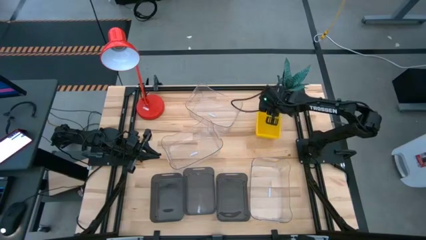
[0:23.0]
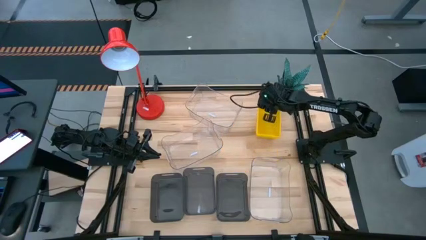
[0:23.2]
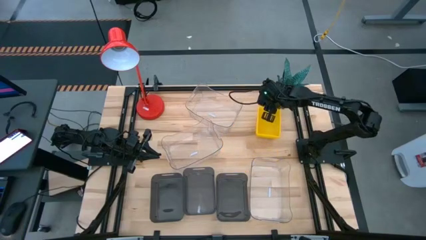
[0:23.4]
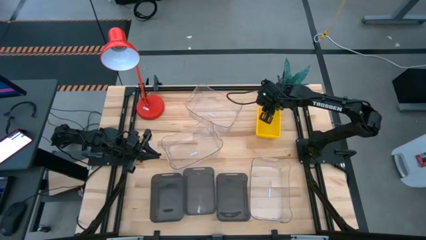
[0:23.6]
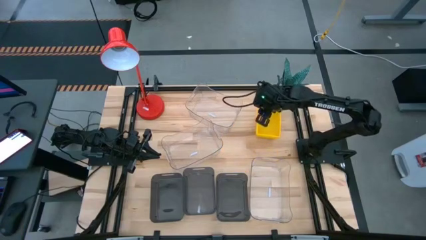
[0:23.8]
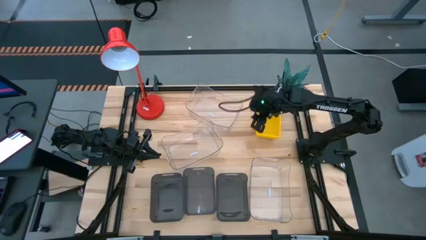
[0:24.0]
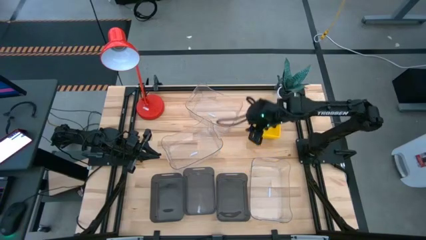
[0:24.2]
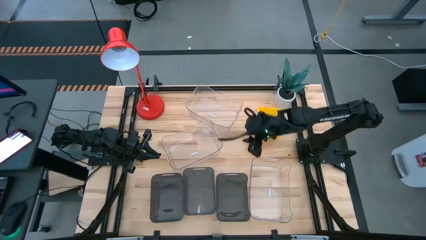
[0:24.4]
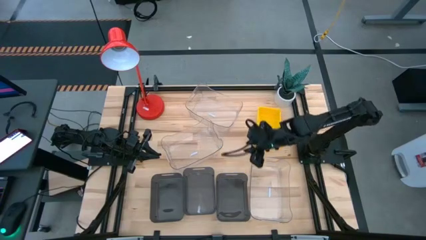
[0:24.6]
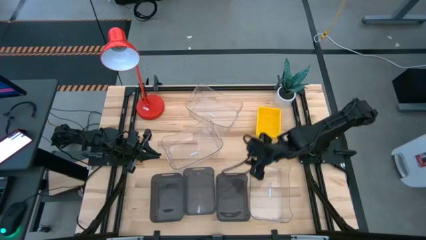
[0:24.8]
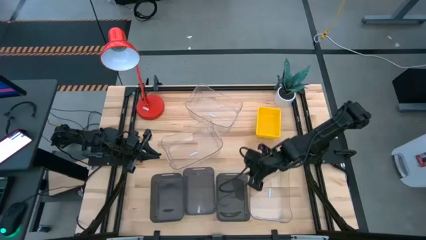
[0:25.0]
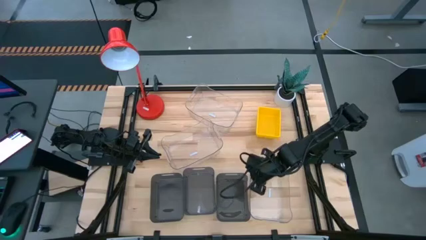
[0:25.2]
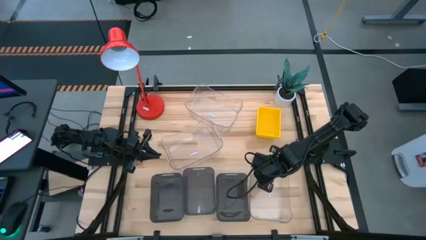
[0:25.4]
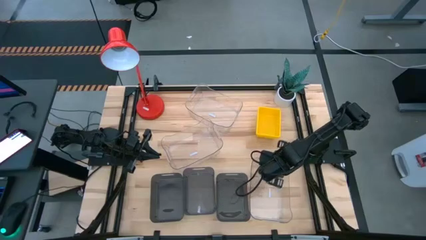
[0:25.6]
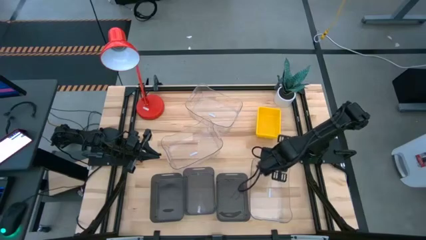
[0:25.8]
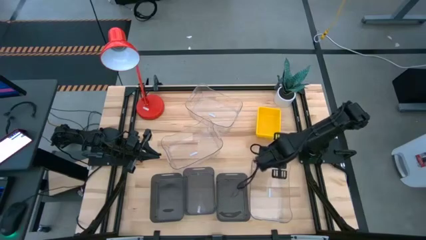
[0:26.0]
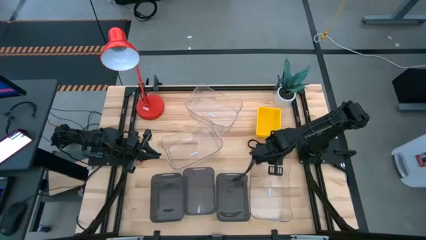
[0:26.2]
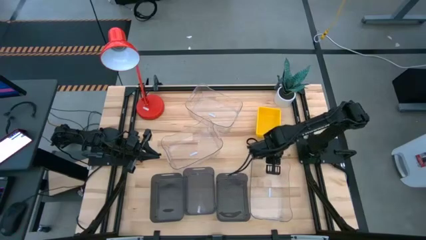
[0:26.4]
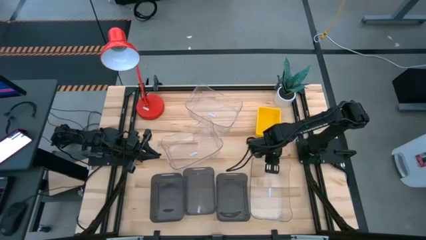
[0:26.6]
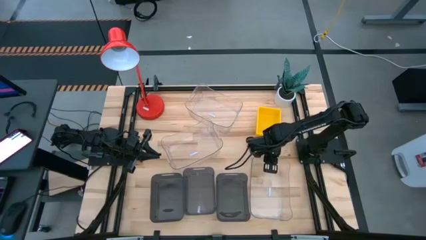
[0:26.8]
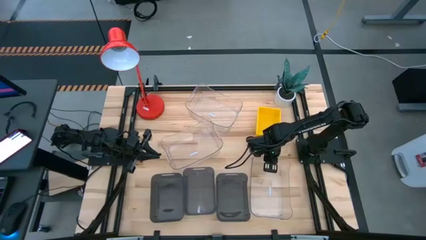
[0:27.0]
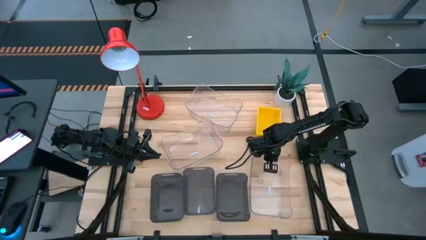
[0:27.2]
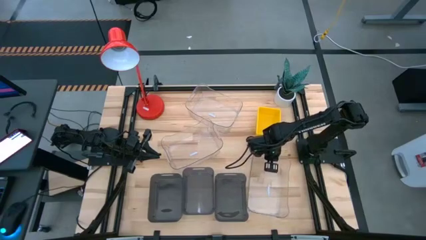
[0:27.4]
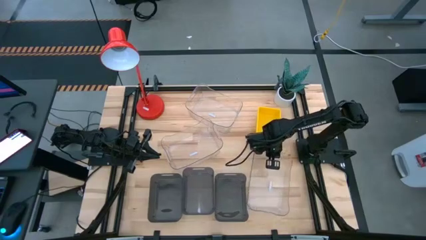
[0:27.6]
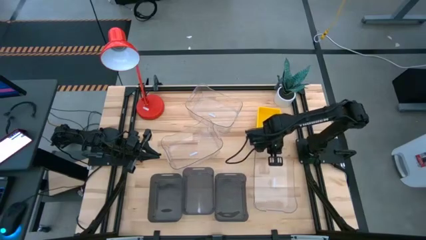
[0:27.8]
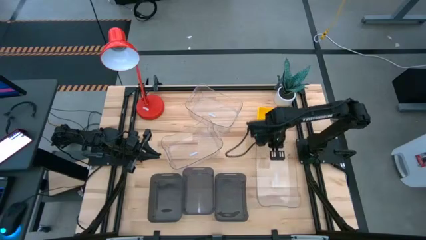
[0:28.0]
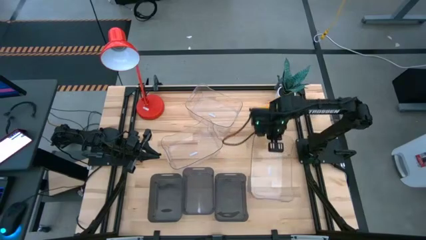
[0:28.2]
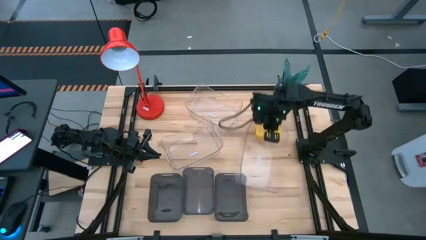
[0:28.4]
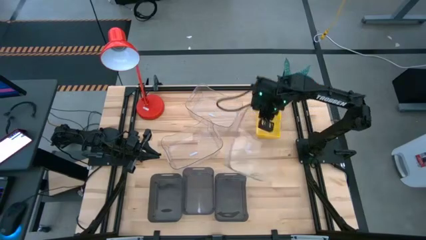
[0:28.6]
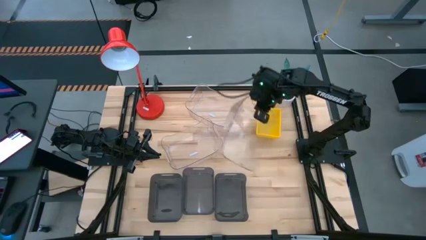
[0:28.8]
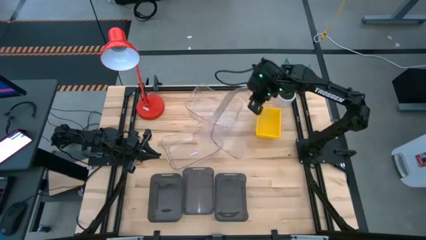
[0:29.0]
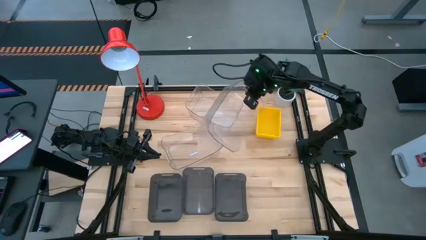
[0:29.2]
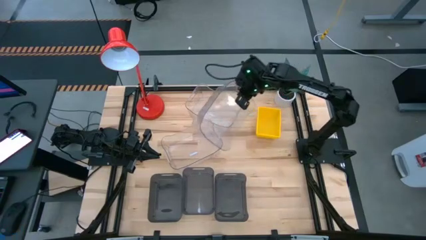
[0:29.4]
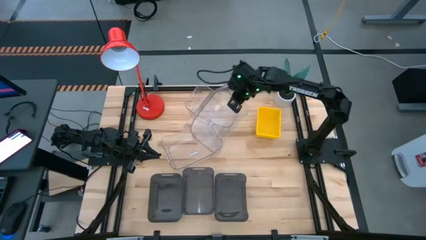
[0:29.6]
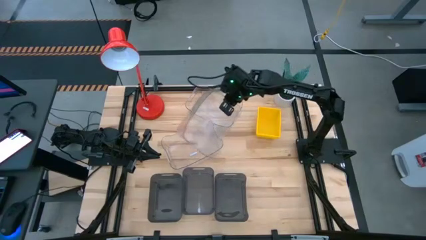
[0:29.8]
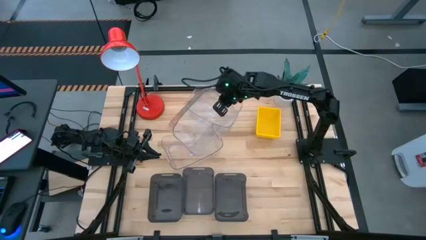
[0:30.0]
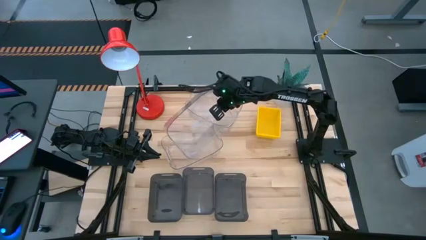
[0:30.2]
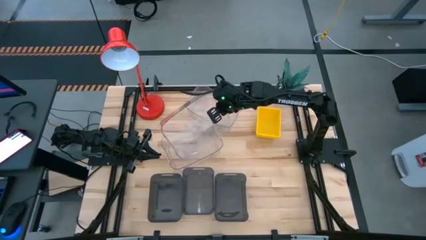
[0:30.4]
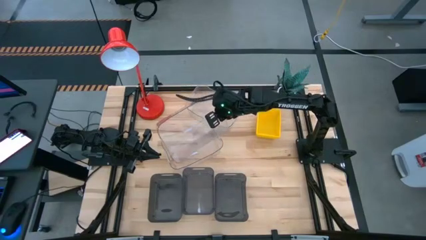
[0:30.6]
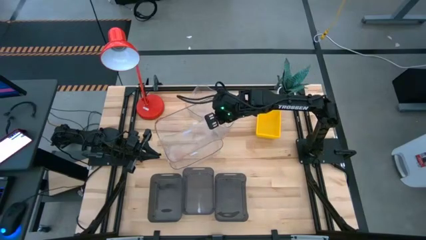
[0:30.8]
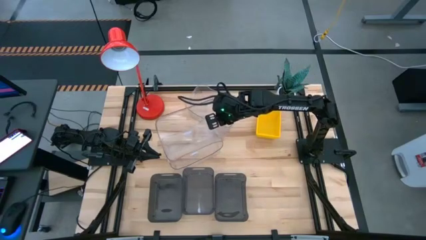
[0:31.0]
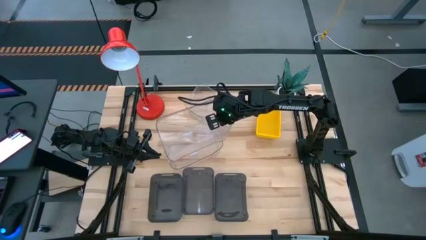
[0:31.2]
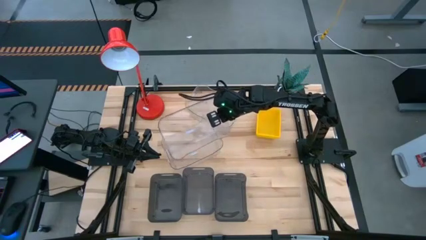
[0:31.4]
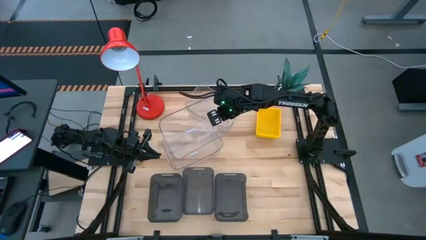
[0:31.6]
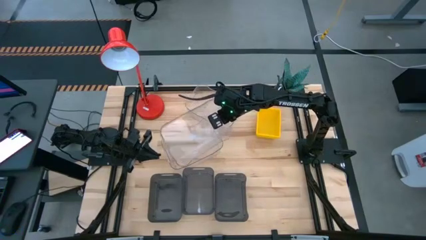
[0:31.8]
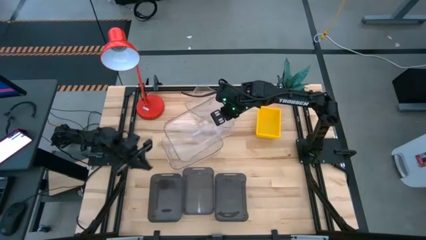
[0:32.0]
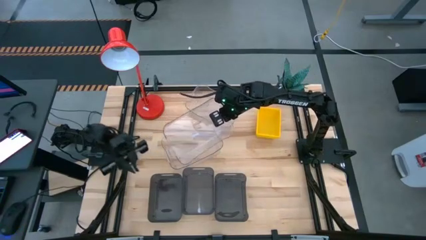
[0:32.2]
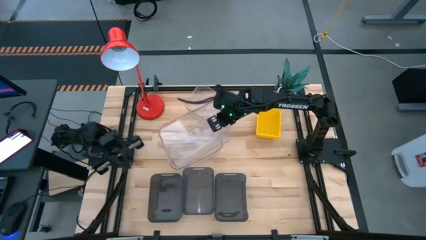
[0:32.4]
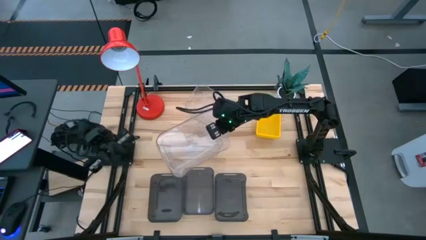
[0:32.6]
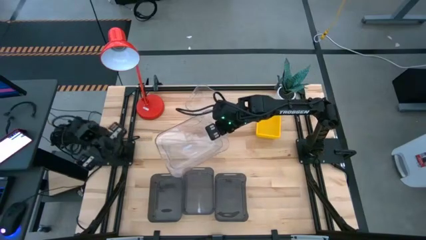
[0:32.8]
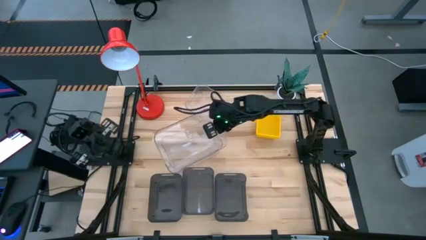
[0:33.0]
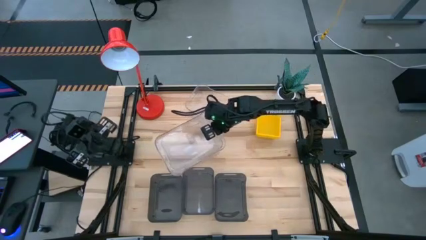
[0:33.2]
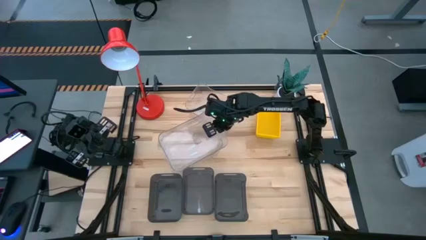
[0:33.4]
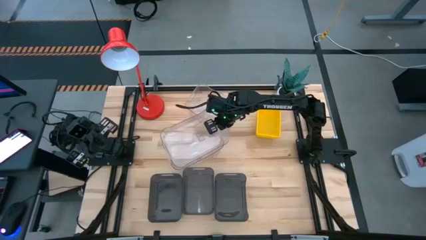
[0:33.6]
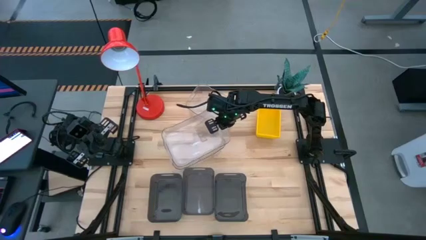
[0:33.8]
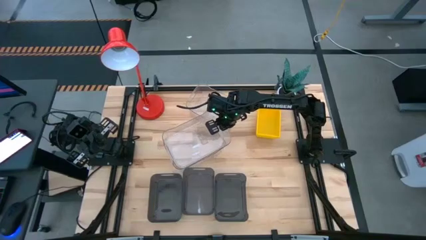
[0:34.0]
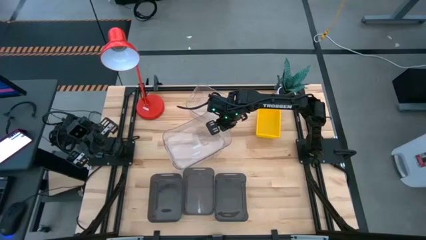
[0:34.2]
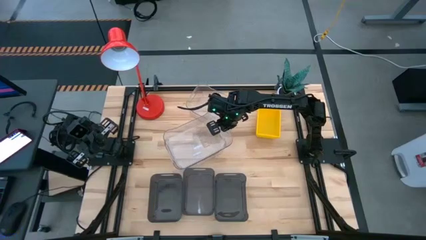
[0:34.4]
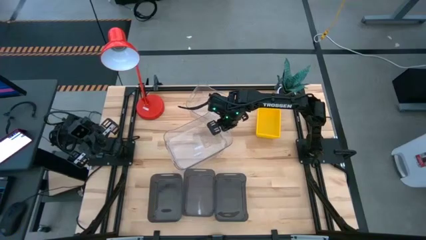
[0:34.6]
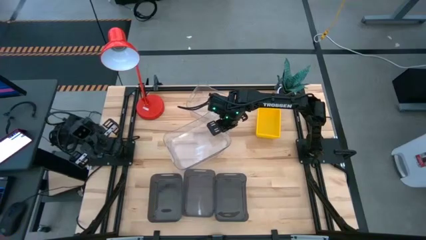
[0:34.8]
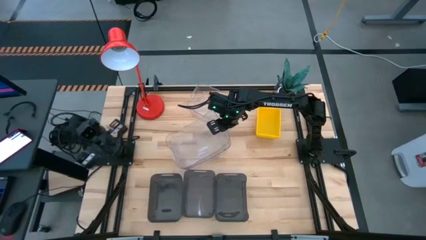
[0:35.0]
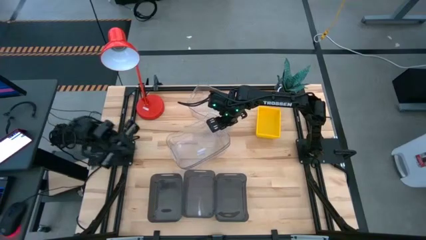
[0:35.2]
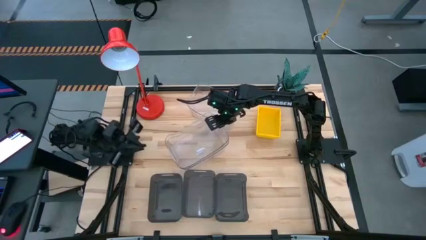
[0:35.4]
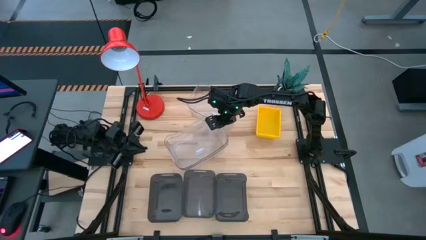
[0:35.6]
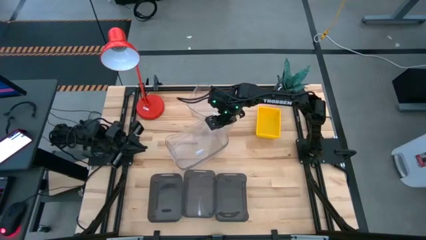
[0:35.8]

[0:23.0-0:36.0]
Stack the bottom transparent bin on the middle left transparent bin
